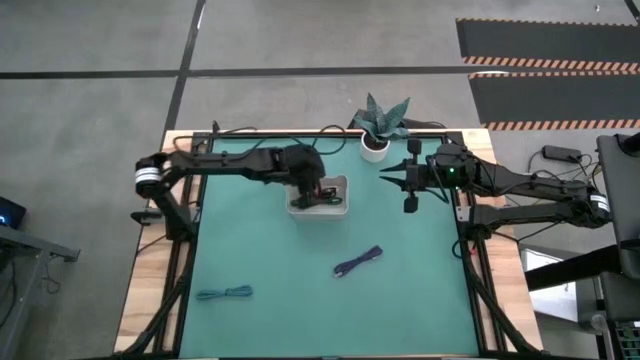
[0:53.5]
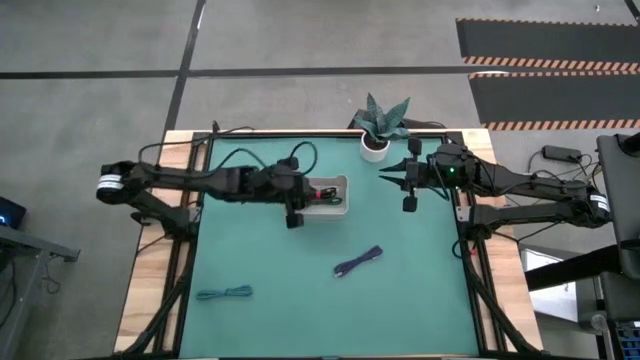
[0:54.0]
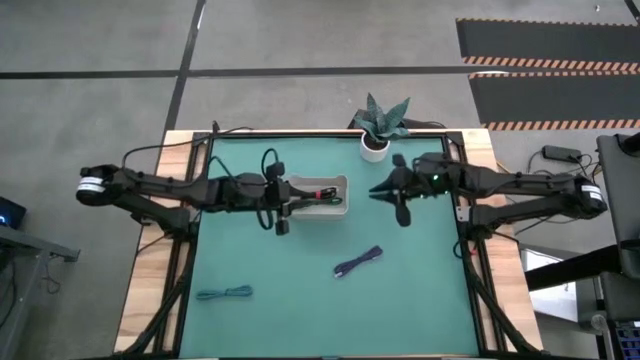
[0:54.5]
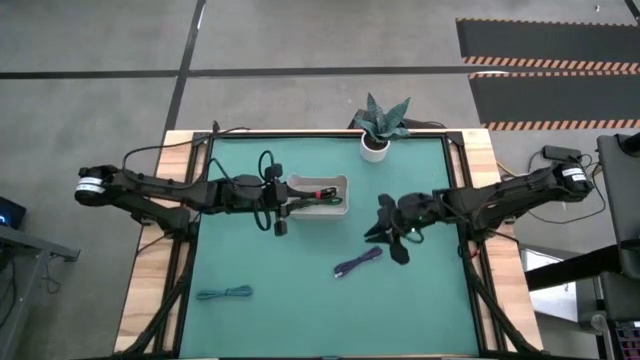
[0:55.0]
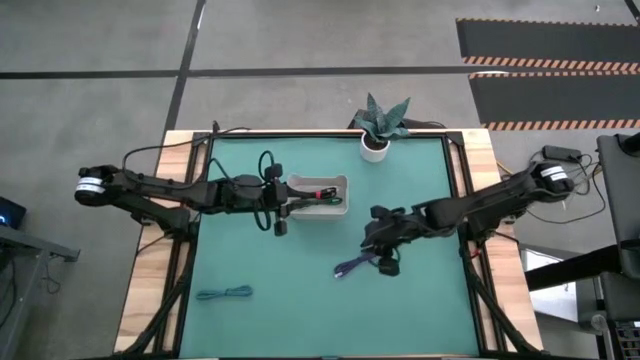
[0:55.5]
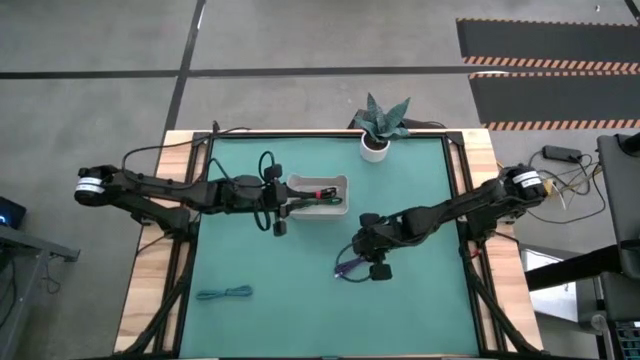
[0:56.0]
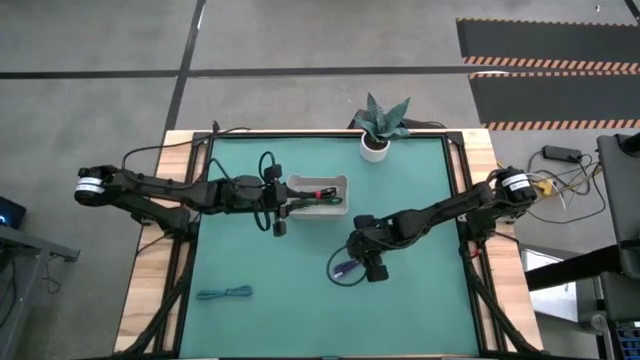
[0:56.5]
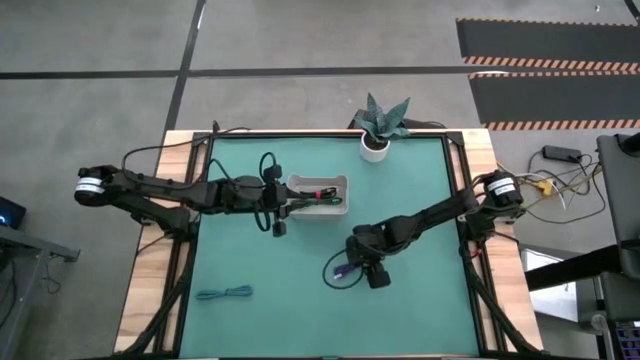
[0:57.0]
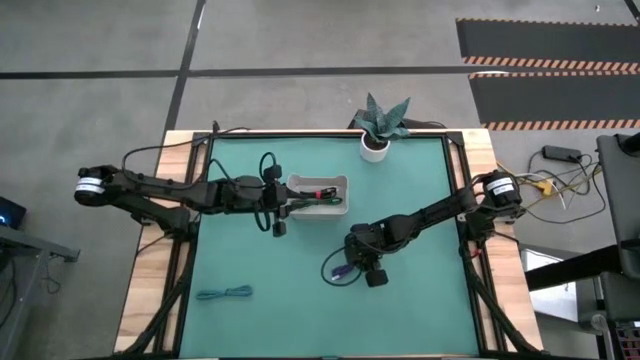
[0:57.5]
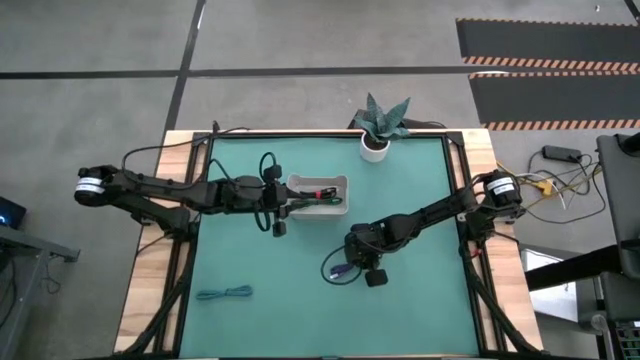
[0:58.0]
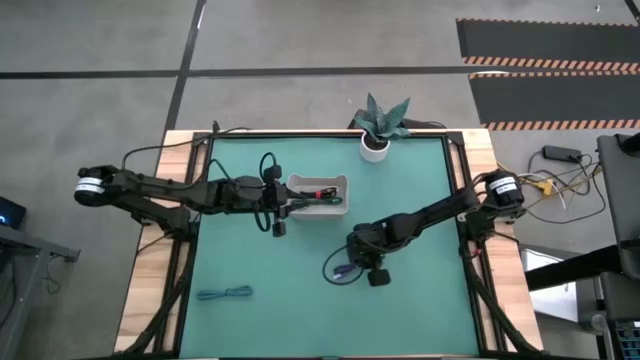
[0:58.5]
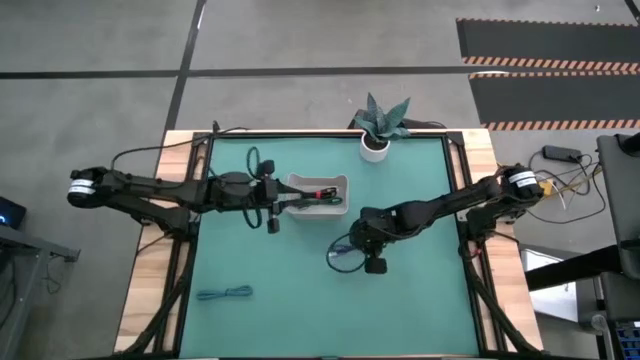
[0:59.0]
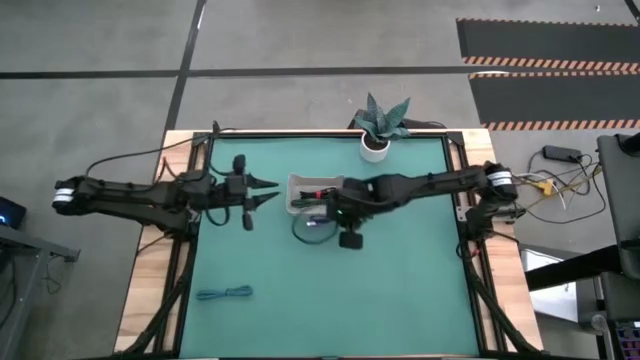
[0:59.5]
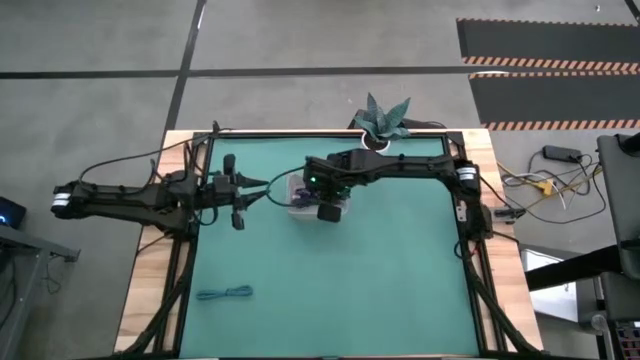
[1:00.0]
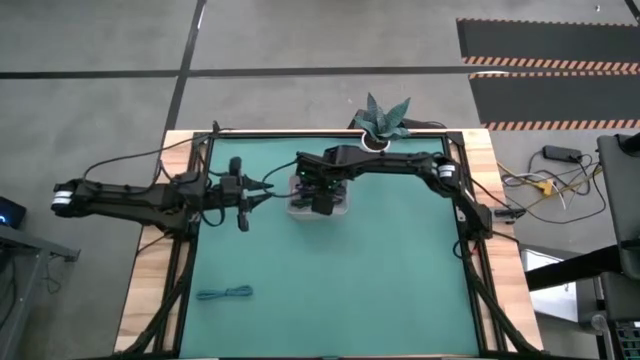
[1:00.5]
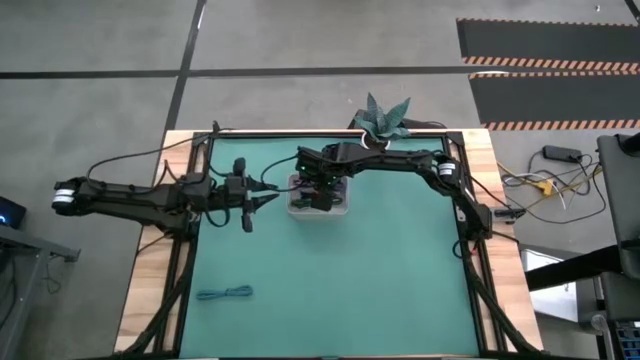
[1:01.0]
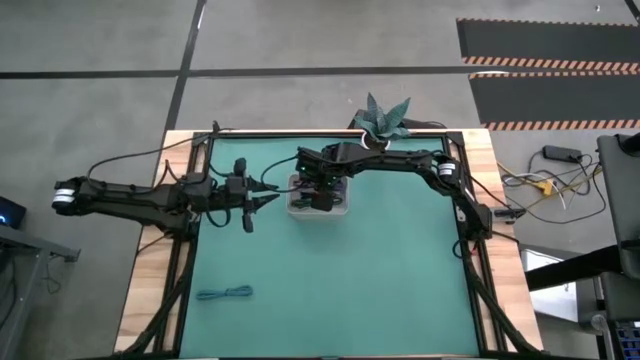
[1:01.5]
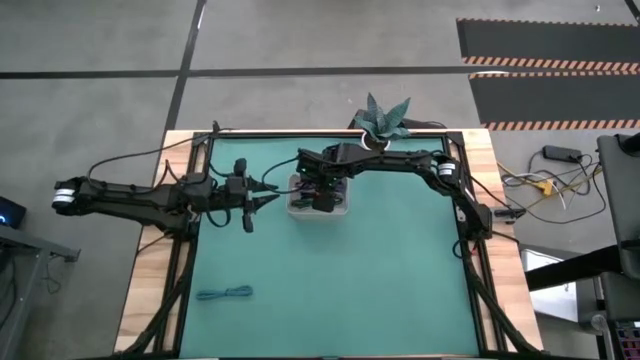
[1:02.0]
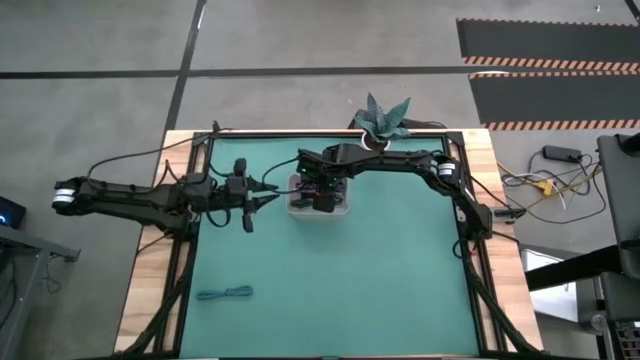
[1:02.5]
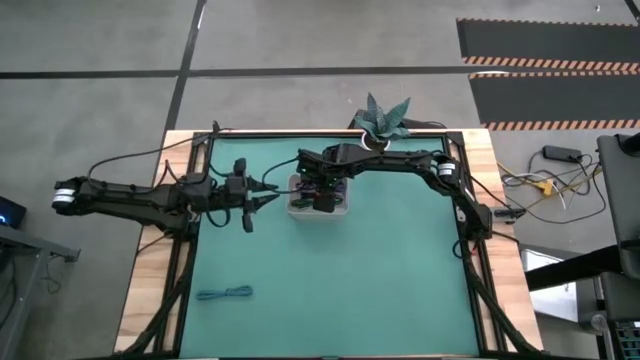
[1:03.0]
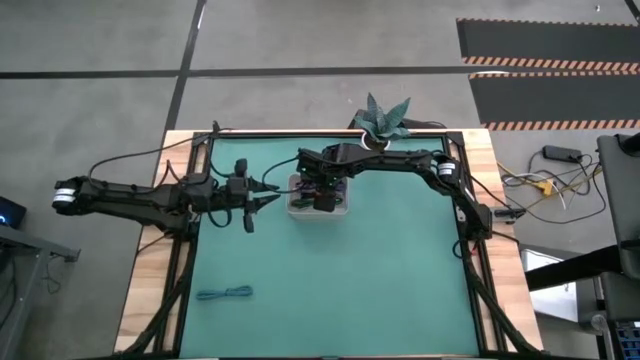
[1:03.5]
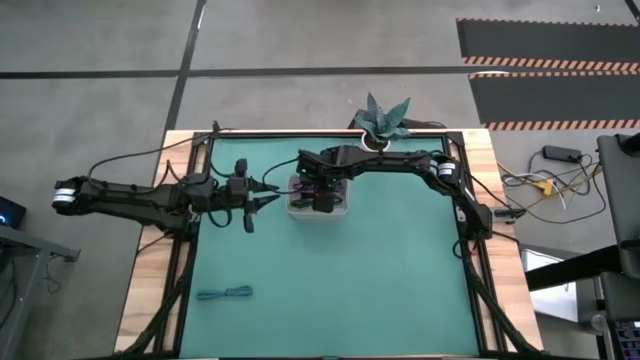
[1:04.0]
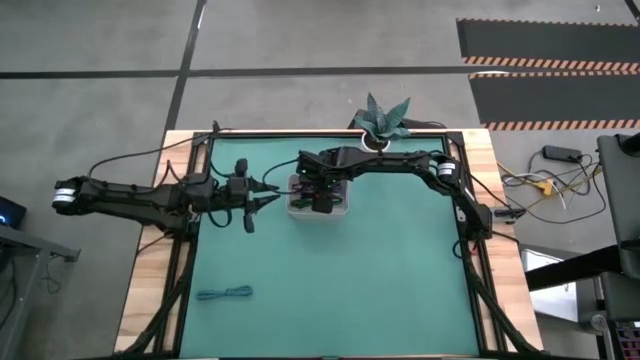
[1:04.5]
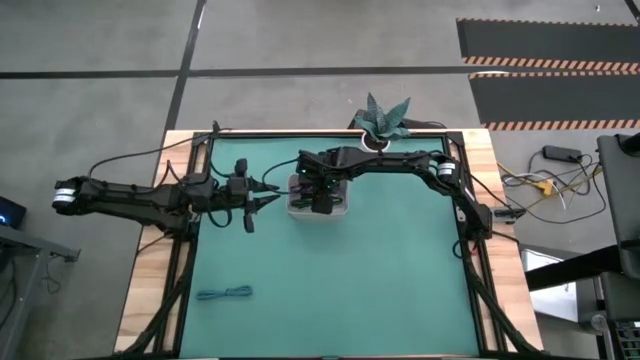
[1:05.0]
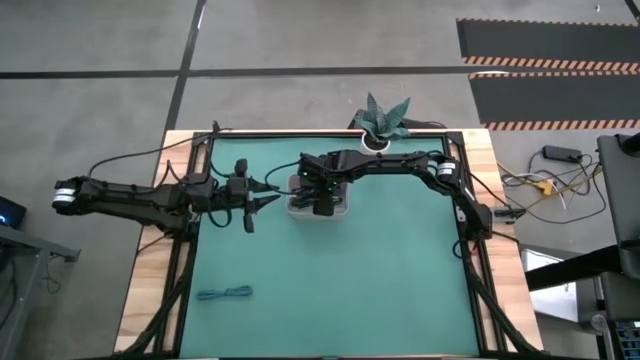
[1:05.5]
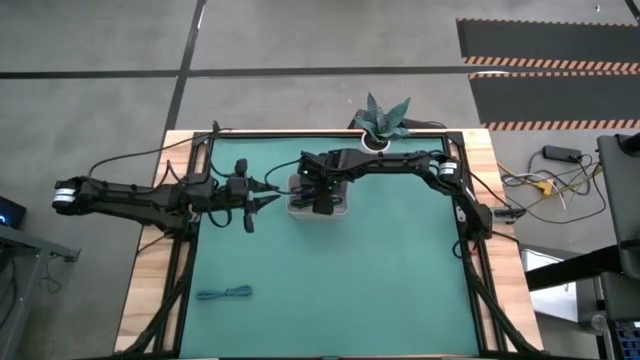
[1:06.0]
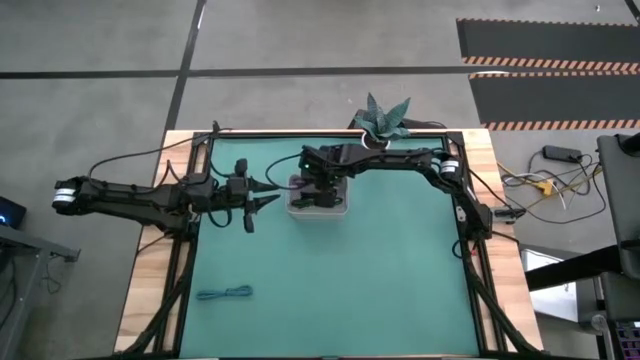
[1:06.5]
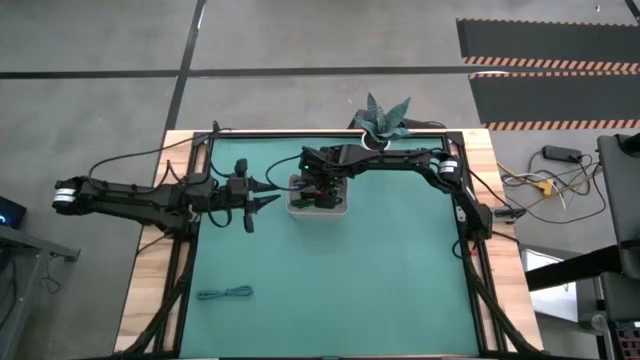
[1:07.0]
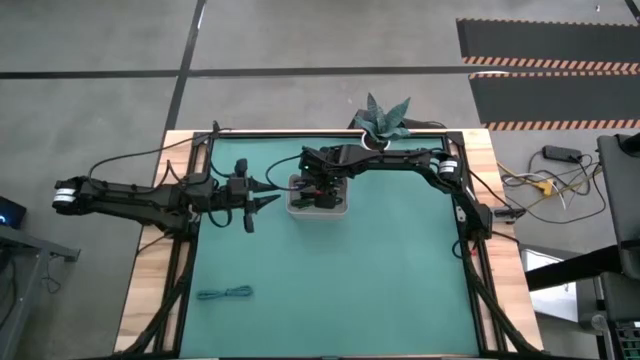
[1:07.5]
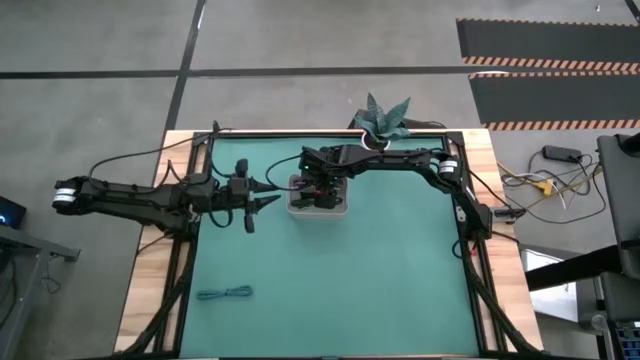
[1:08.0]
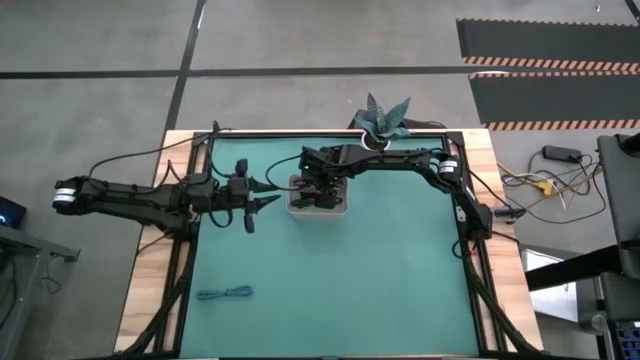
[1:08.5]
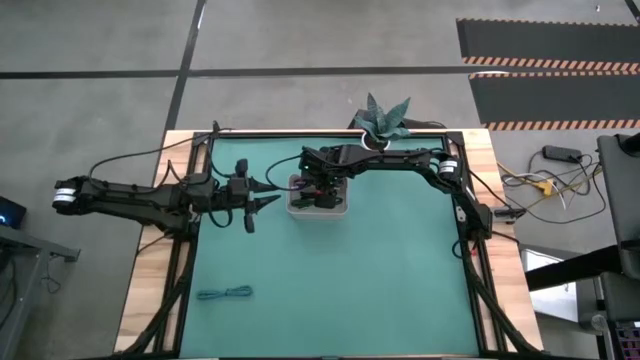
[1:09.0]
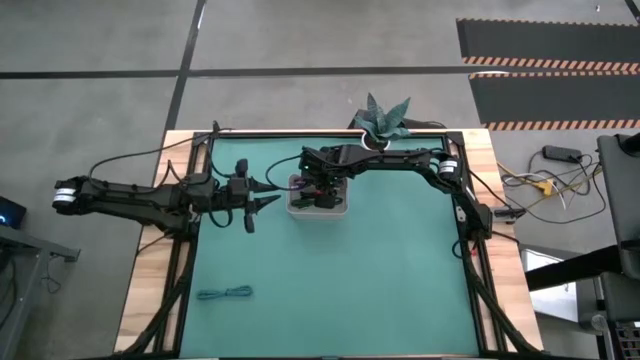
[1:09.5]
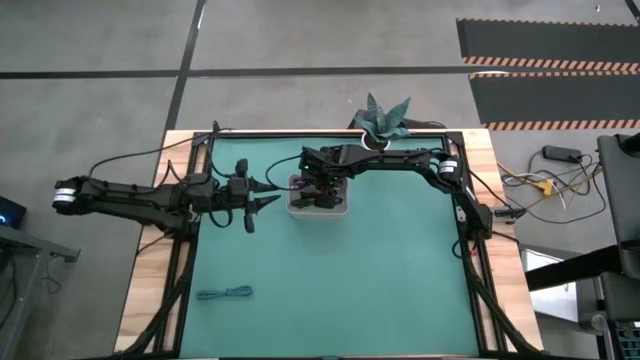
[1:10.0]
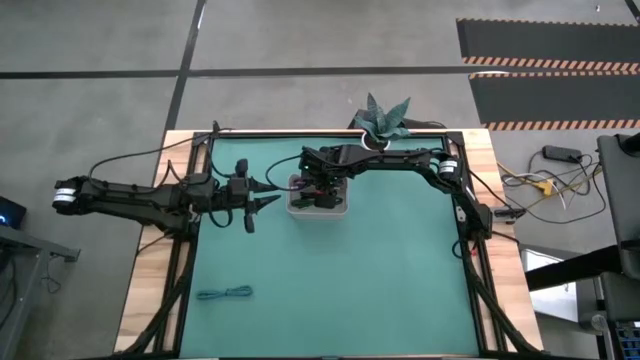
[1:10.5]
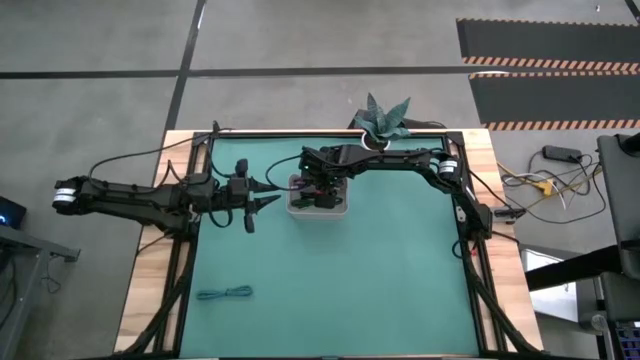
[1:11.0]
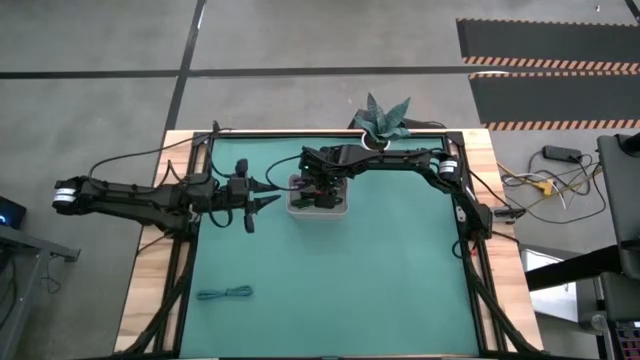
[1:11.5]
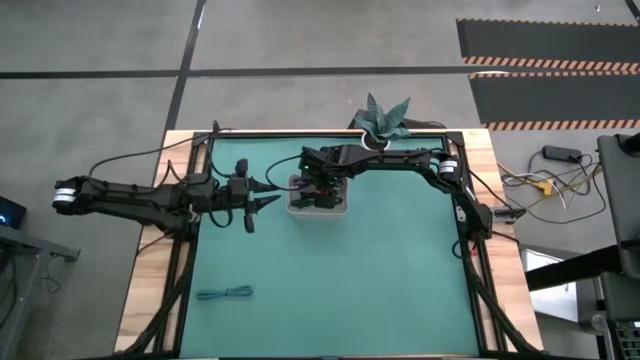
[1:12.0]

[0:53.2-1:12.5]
Task: Pick and place USB-C Cables
Put the purple charger cable into the white bin

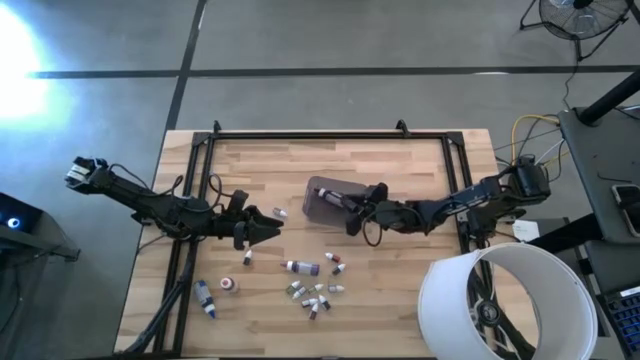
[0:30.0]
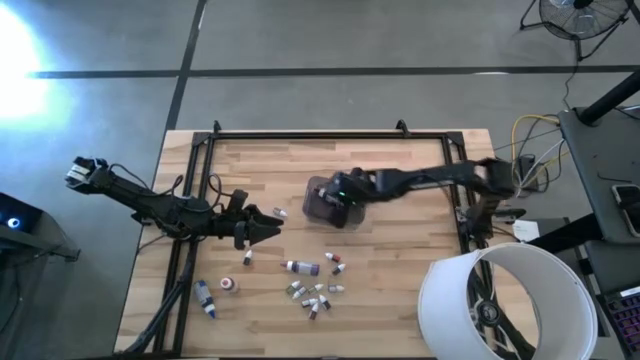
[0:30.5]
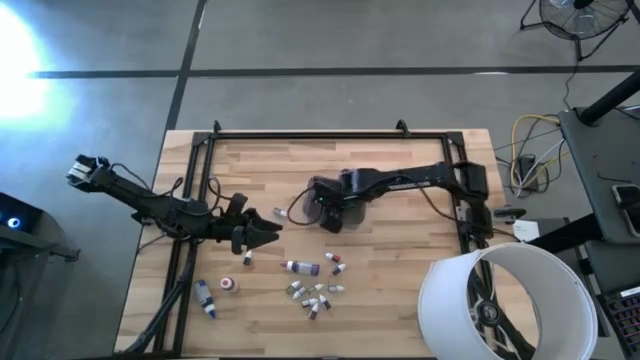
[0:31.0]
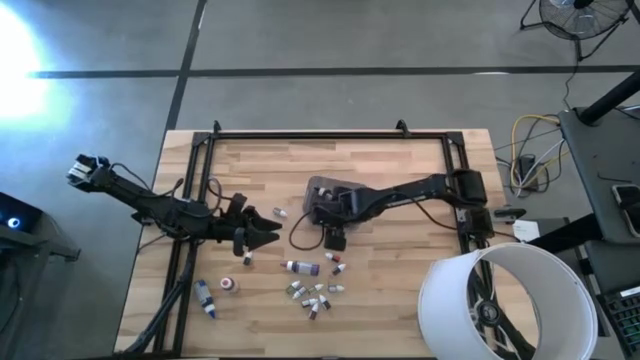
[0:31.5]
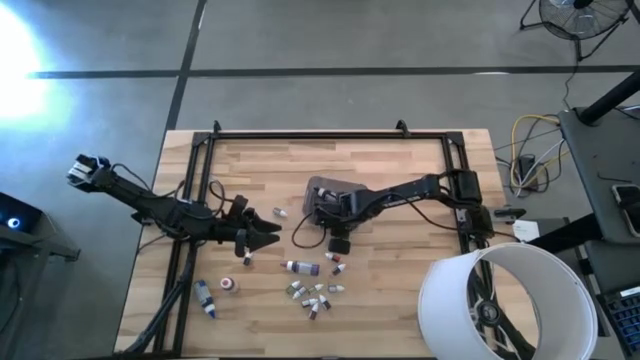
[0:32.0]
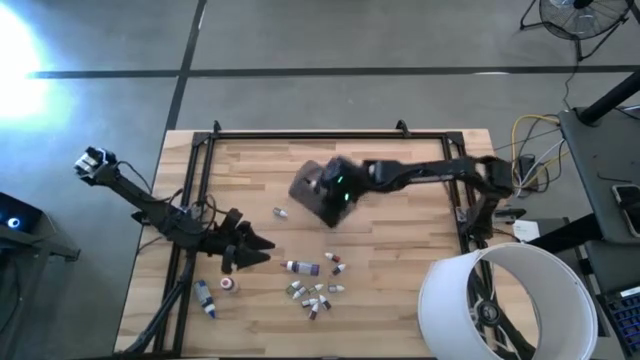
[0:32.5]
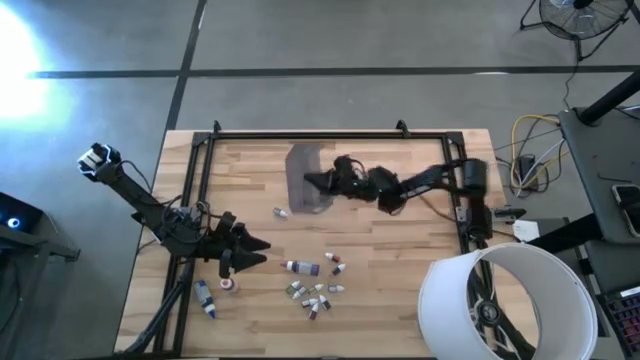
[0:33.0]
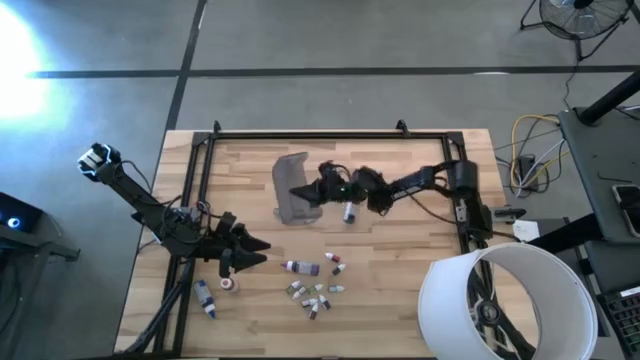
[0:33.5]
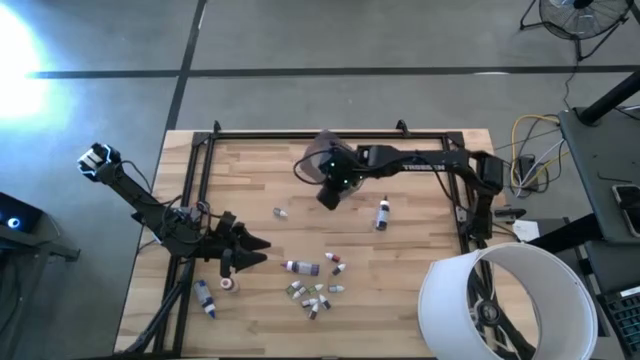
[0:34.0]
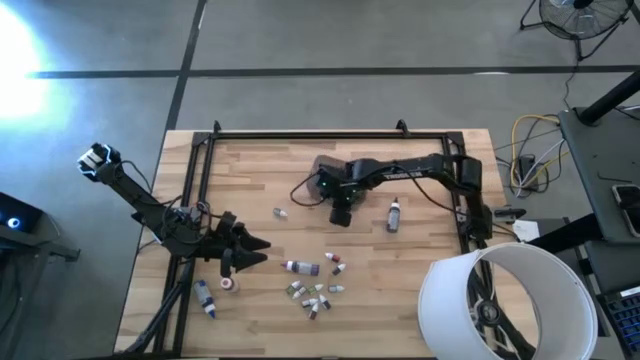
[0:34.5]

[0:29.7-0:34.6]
Task: Pick & Place food coloring
Remove the large black food coloring bottle from the black bin
